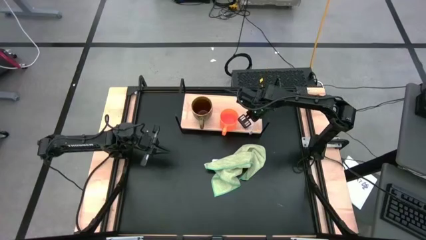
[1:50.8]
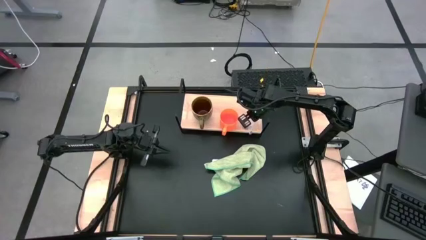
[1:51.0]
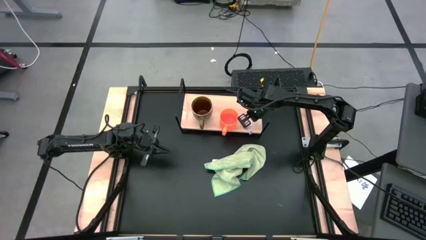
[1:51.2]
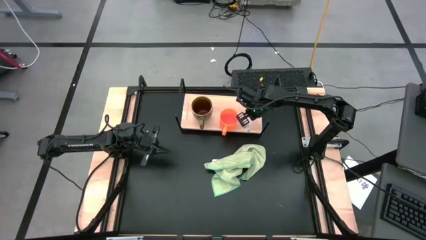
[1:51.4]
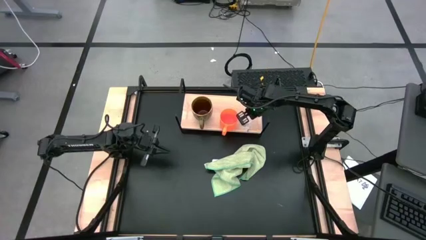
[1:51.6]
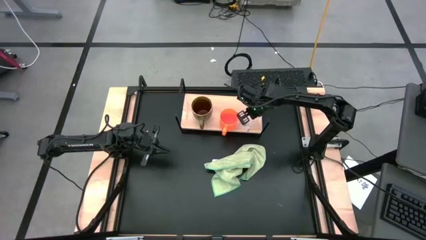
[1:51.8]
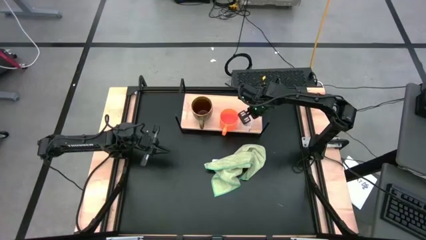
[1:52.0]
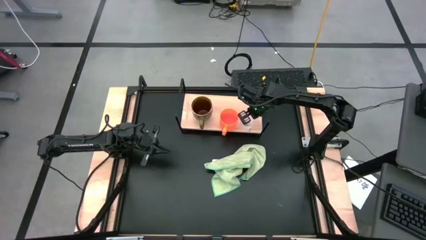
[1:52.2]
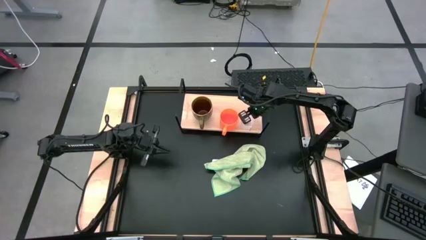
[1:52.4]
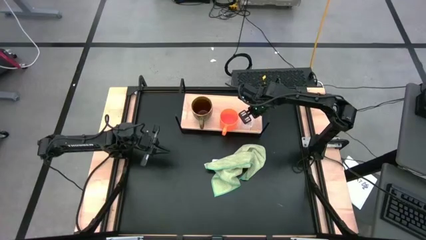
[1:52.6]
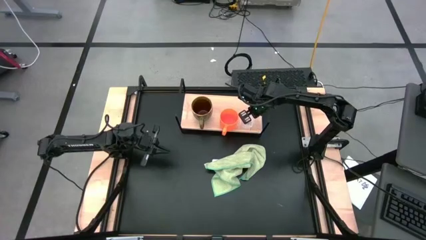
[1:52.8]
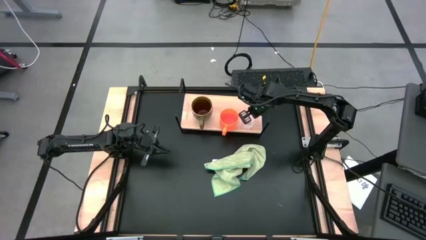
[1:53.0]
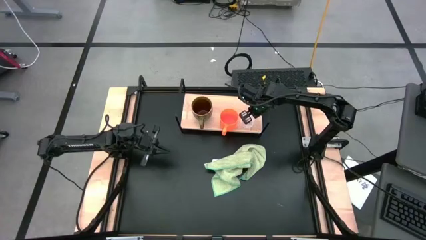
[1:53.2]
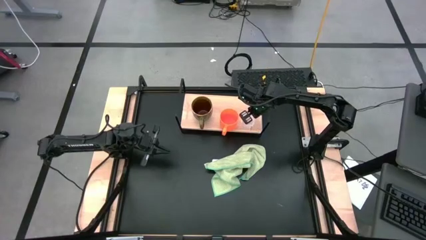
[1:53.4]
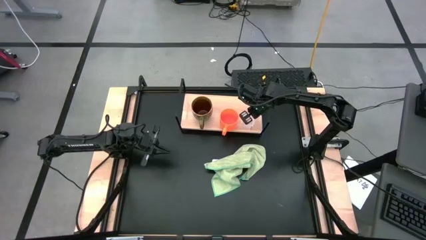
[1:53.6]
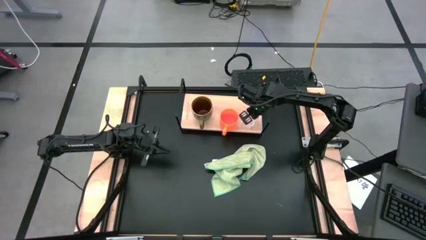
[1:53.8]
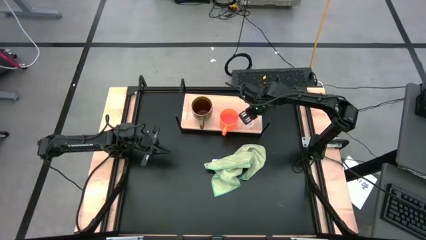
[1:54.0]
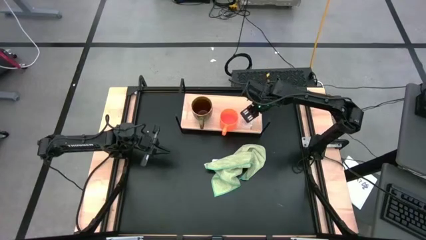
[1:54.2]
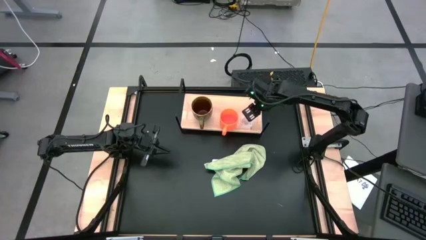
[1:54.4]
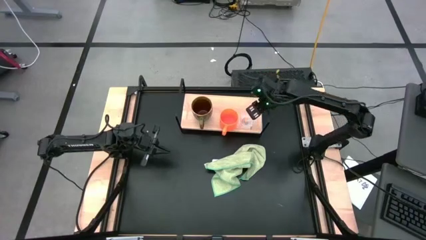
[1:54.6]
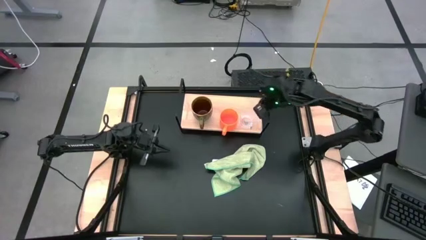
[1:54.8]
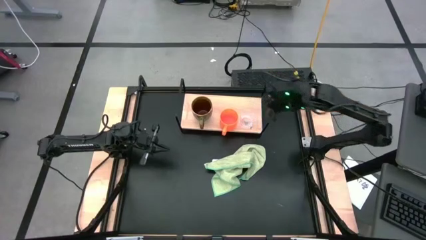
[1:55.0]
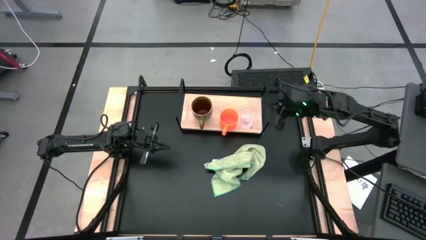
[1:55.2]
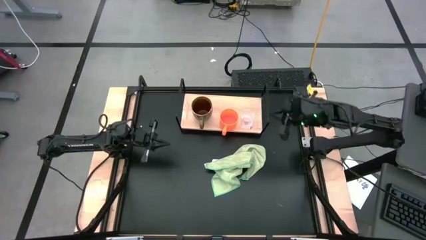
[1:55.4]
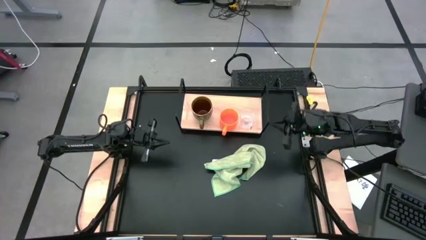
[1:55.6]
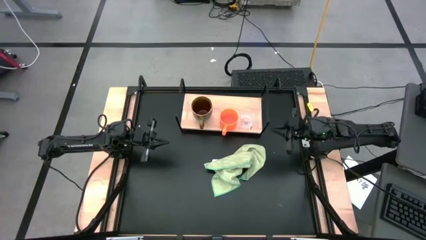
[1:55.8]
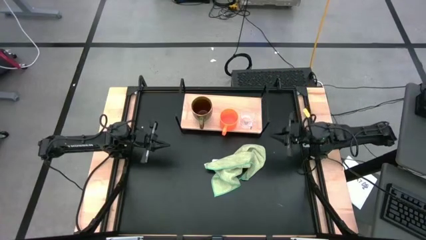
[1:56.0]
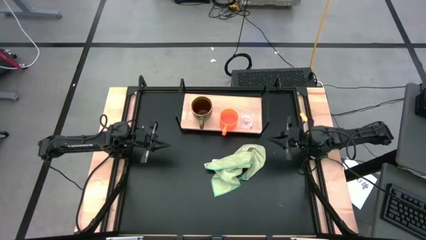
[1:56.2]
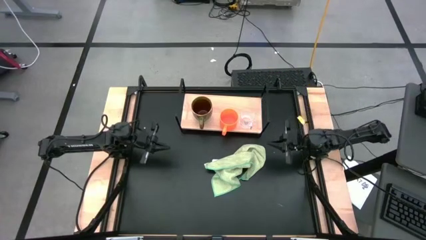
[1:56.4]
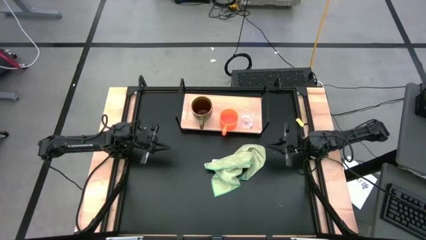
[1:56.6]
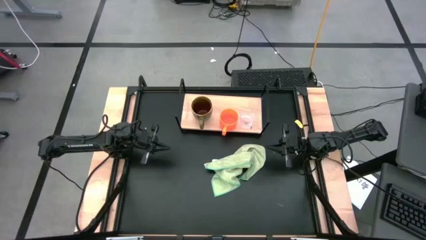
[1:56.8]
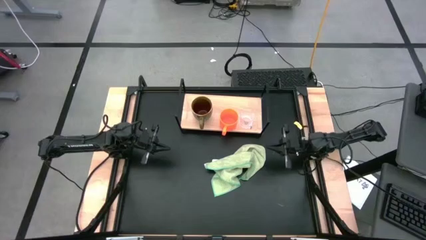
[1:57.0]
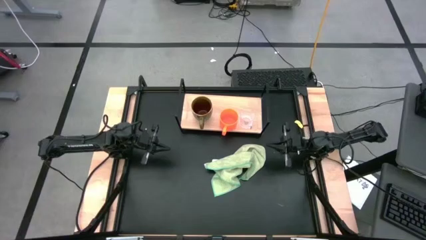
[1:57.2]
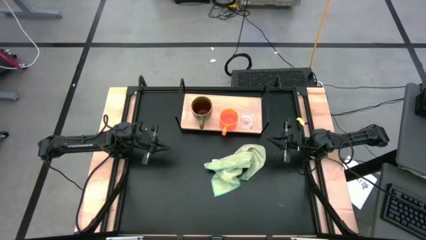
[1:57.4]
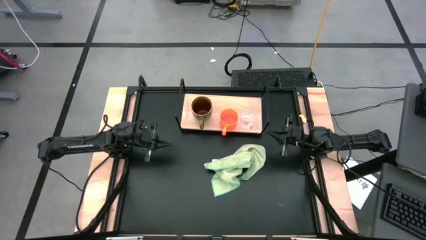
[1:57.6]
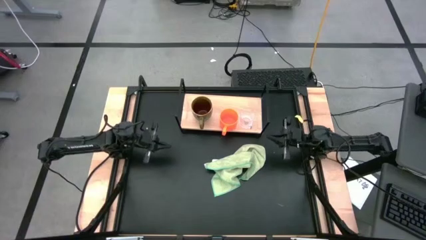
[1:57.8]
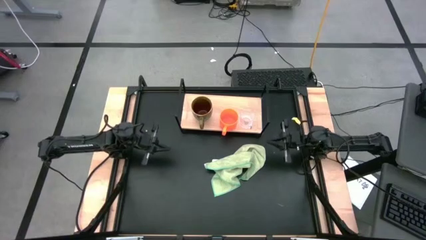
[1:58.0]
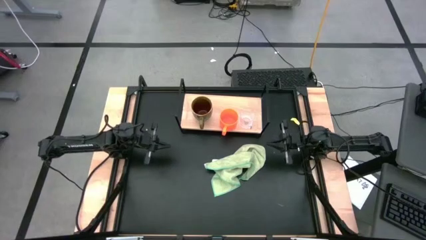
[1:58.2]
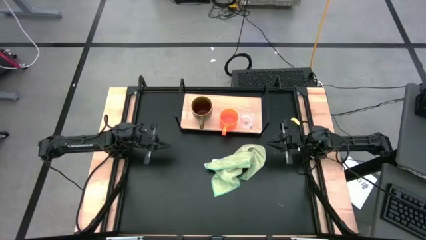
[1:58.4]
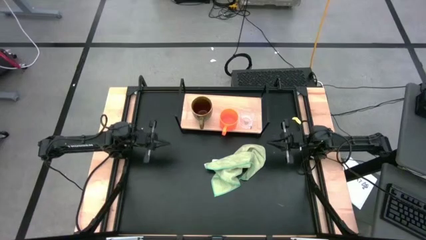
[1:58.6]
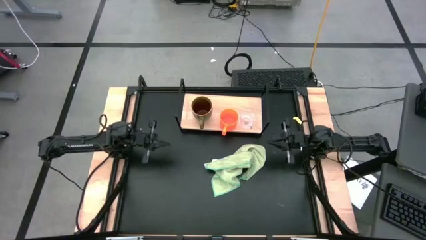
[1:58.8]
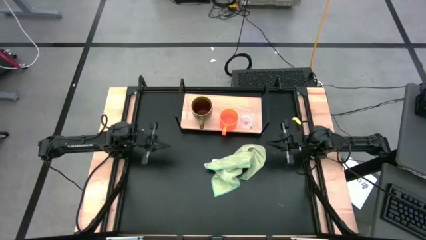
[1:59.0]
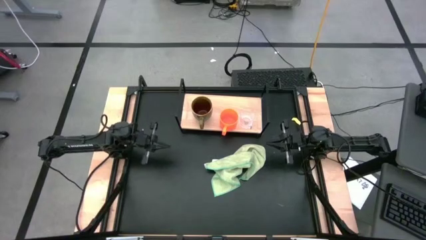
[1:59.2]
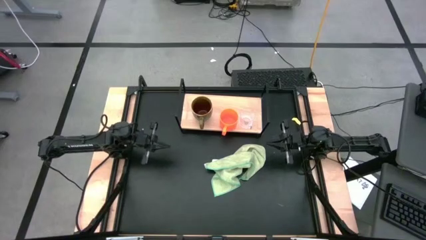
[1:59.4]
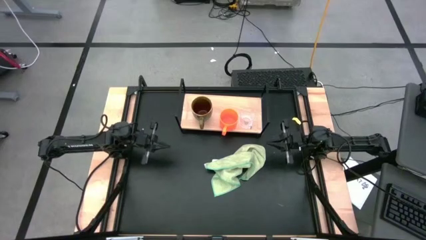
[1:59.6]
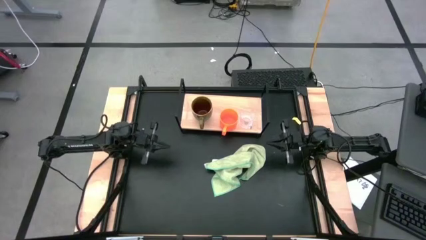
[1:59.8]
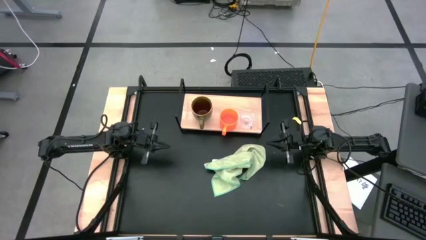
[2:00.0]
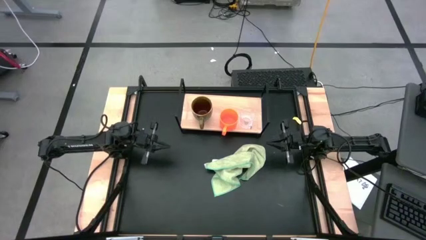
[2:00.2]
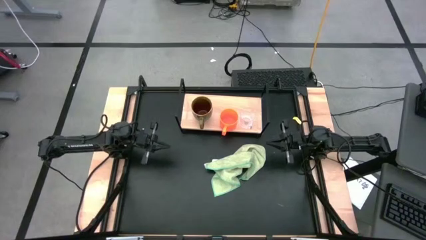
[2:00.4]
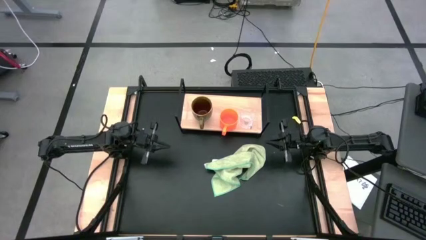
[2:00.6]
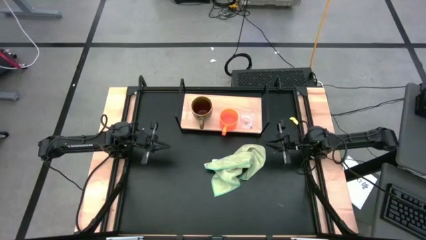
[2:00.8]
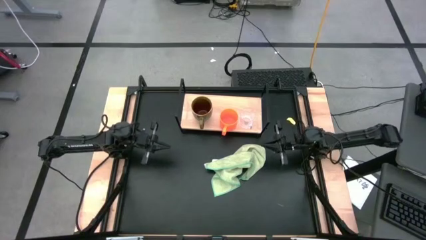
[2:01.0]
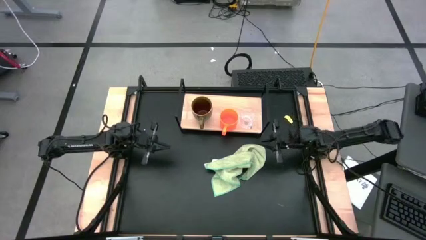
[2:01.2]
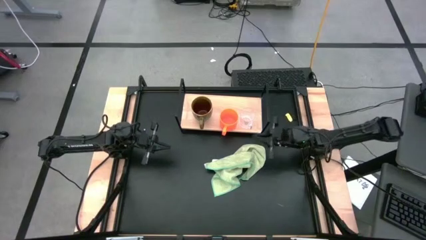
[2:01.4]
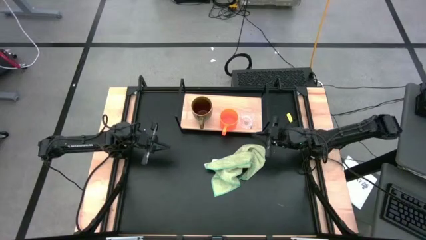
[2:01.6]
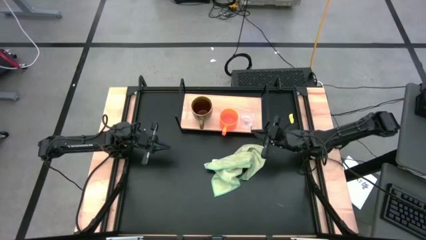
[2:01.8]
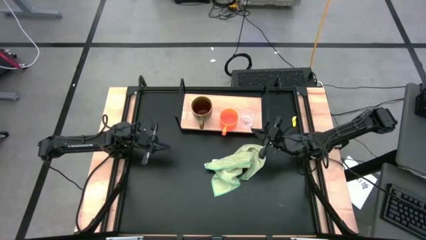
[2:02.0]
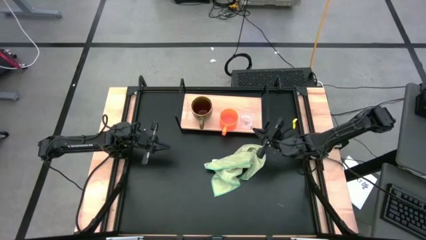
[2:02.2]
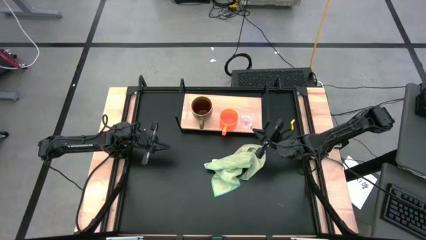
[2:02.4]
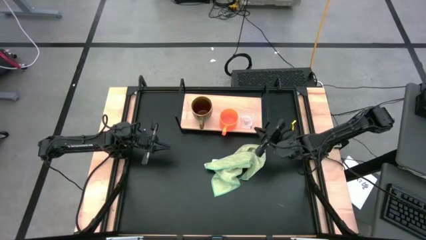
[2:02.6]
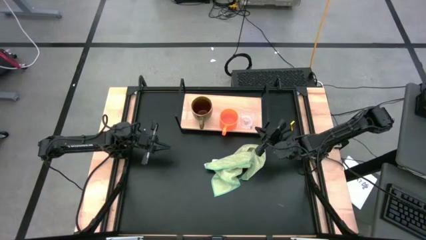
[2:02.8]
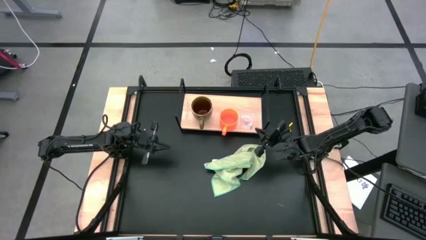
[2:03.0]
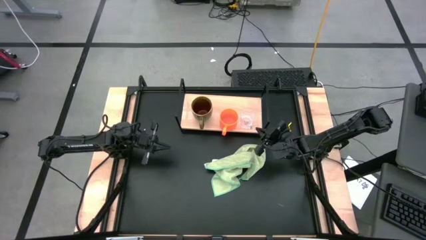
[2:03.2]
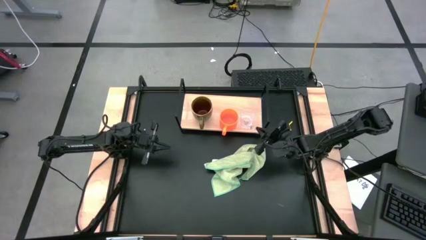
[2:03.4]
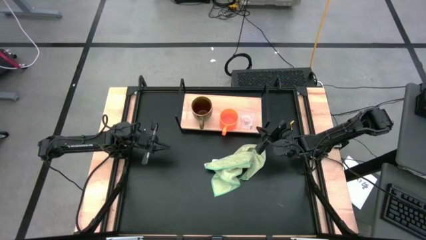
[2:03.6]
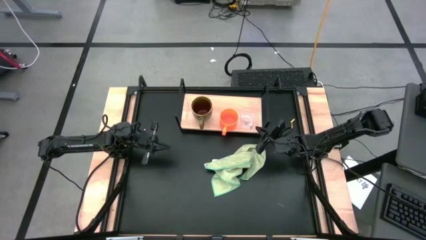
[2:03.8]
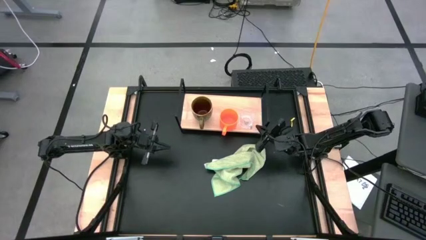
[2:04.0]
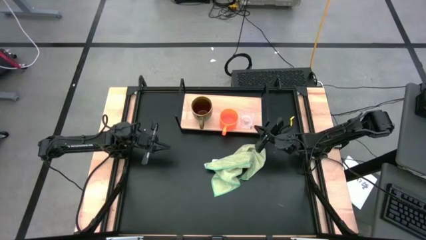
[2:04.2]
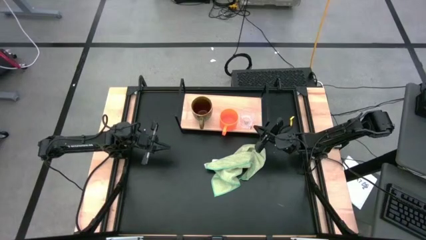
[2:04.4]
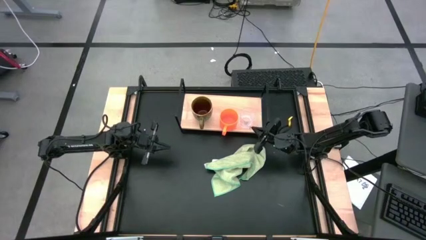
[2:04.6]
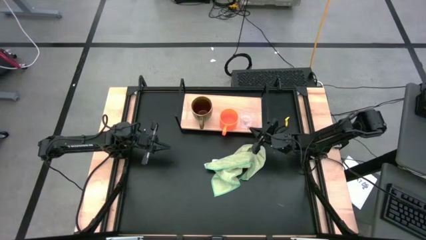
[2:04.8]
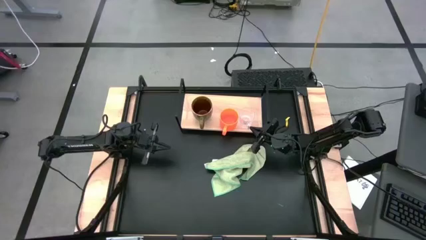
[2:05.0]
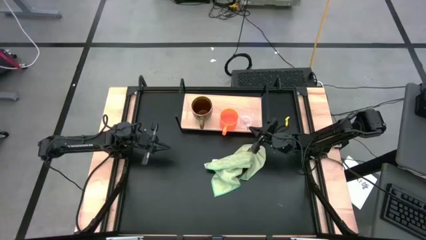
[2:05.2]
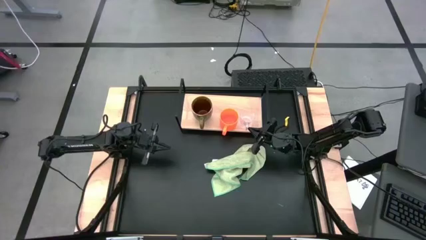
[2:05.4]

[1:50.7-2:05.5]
Task: Stack small to large cups/mugs on shelf
Put the transparent mug on the shelf
